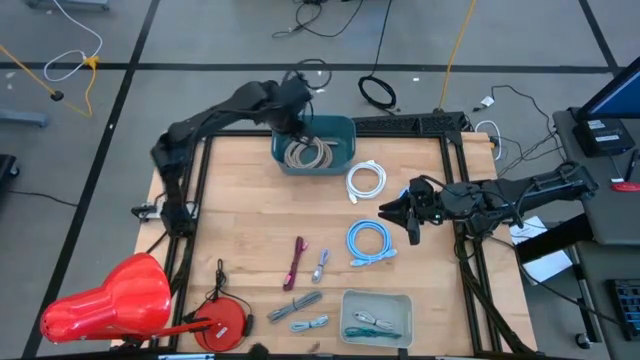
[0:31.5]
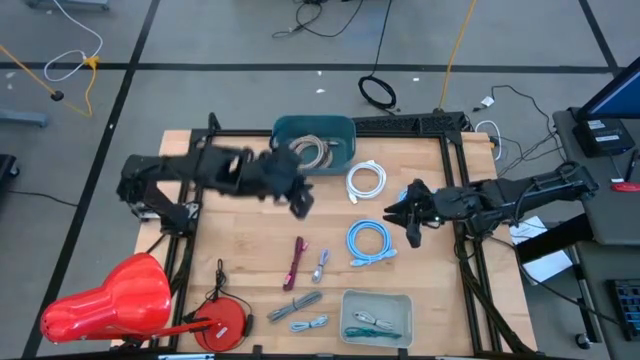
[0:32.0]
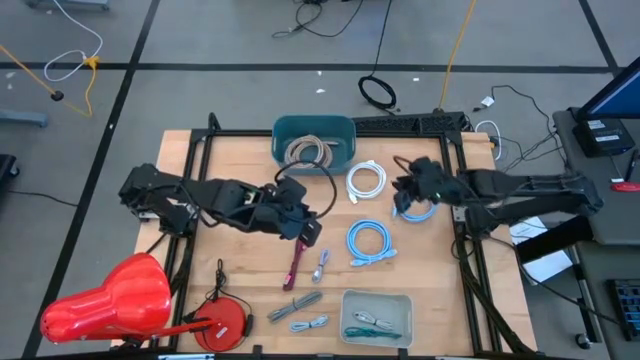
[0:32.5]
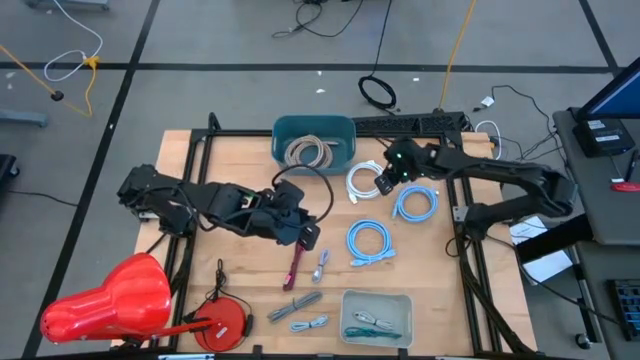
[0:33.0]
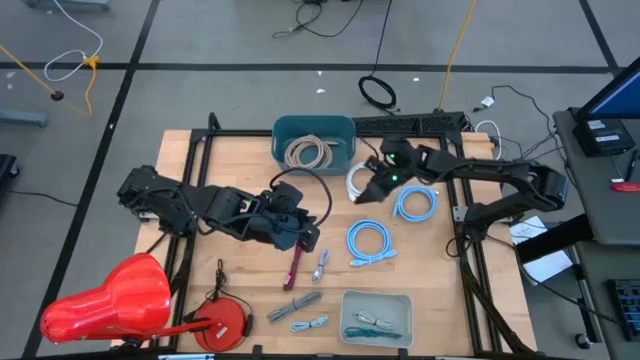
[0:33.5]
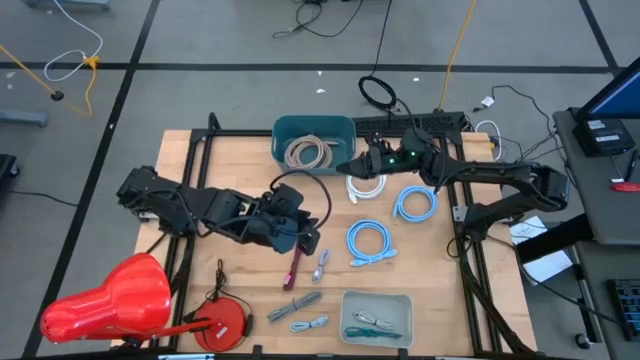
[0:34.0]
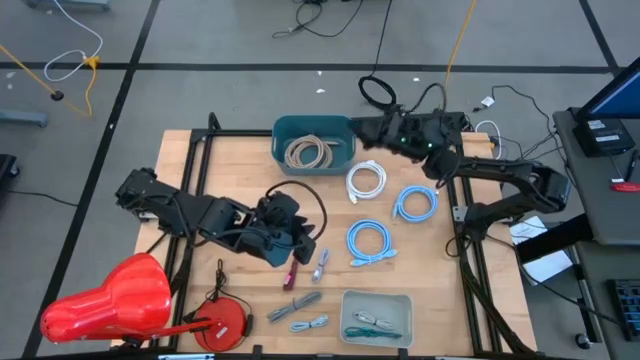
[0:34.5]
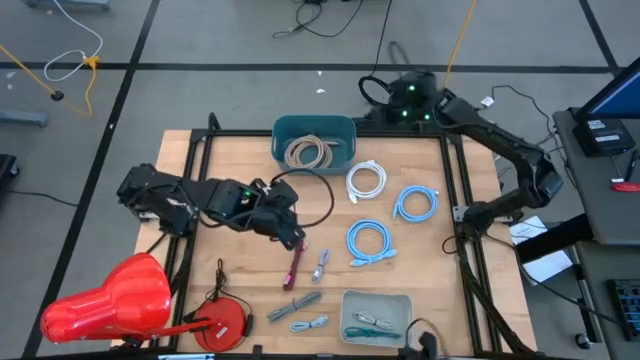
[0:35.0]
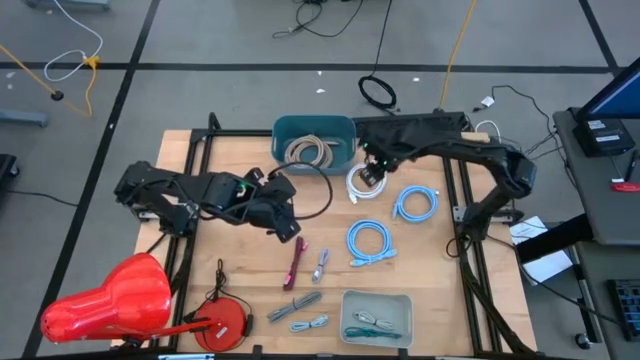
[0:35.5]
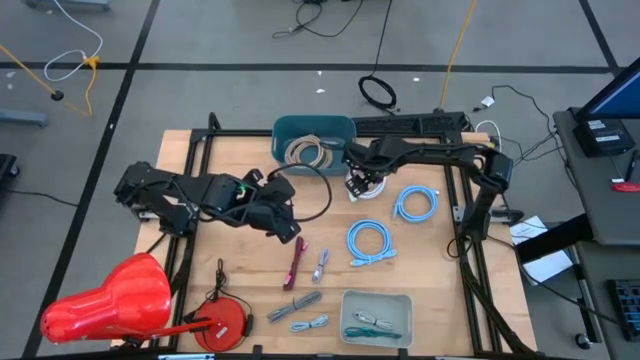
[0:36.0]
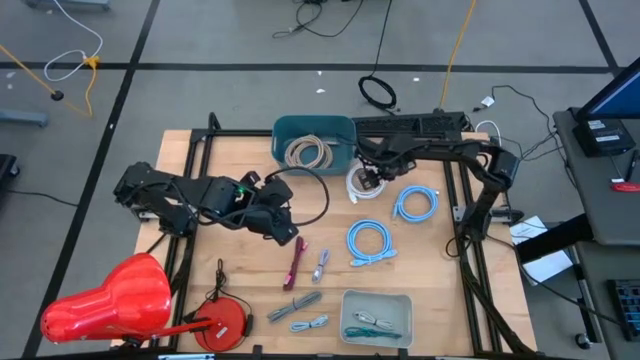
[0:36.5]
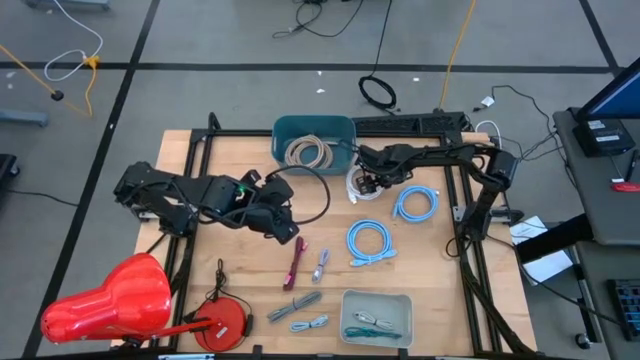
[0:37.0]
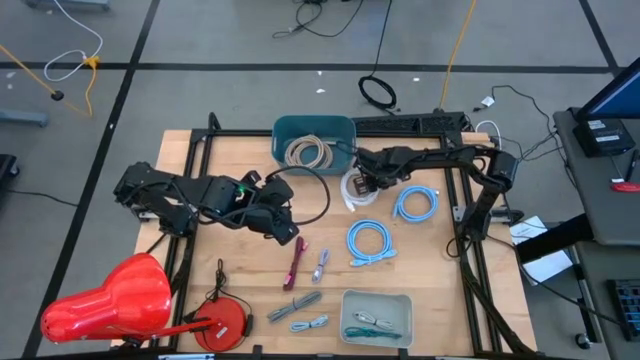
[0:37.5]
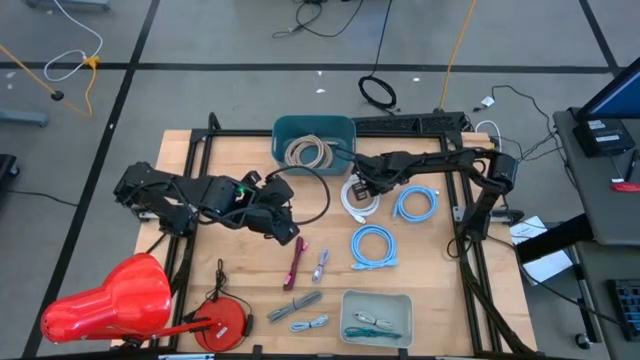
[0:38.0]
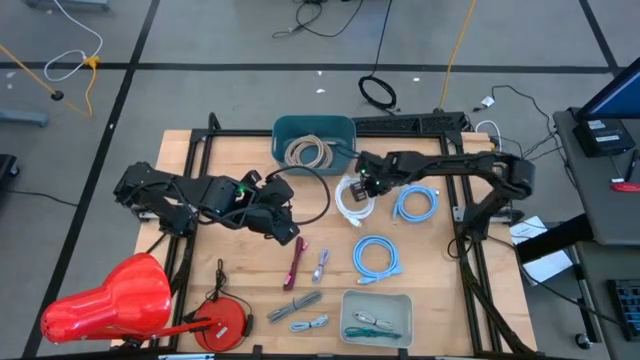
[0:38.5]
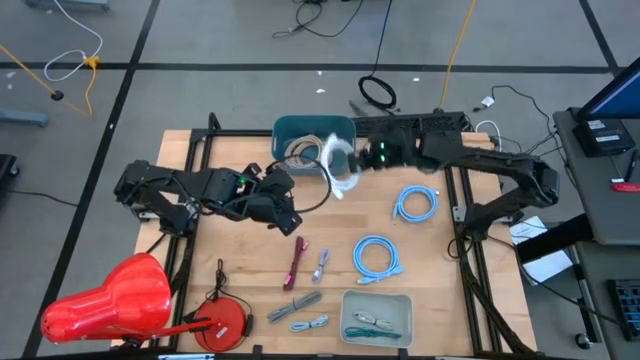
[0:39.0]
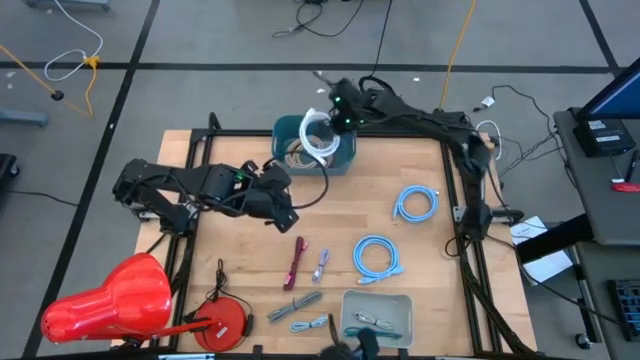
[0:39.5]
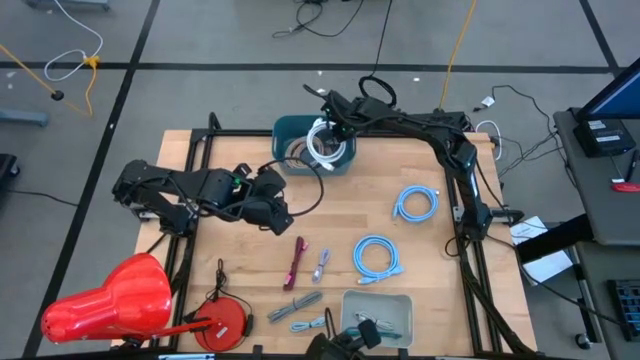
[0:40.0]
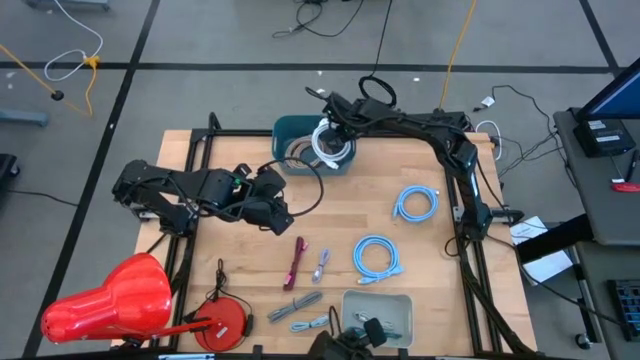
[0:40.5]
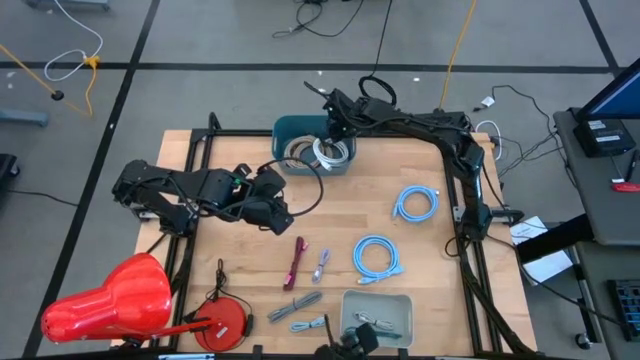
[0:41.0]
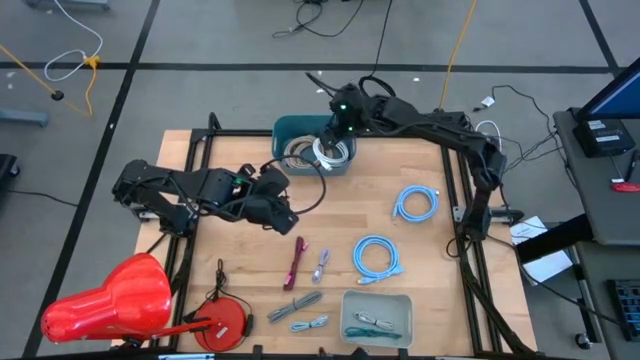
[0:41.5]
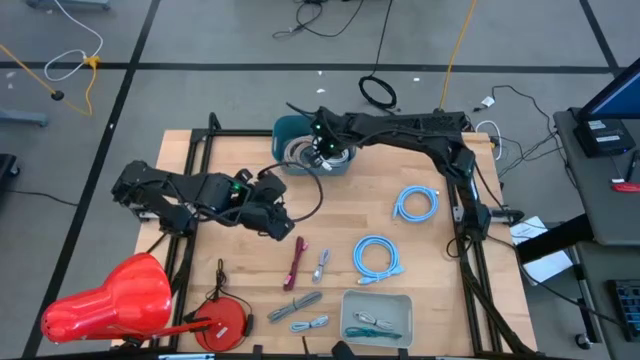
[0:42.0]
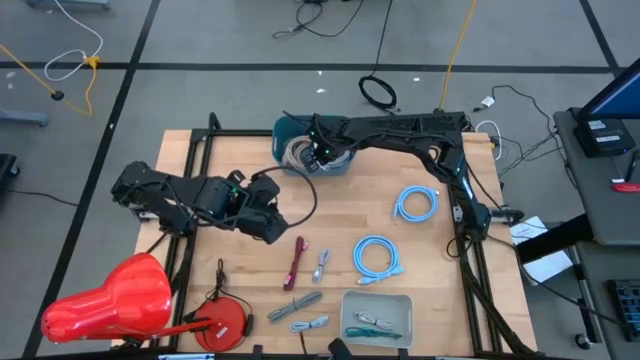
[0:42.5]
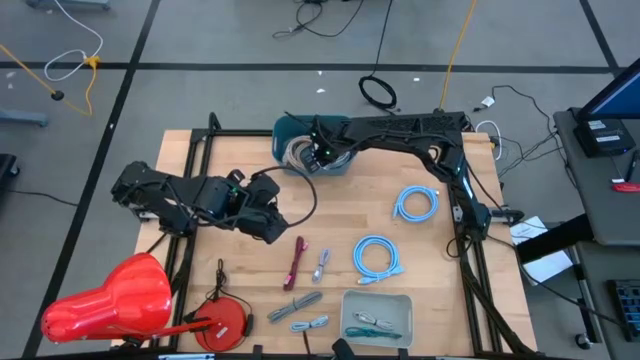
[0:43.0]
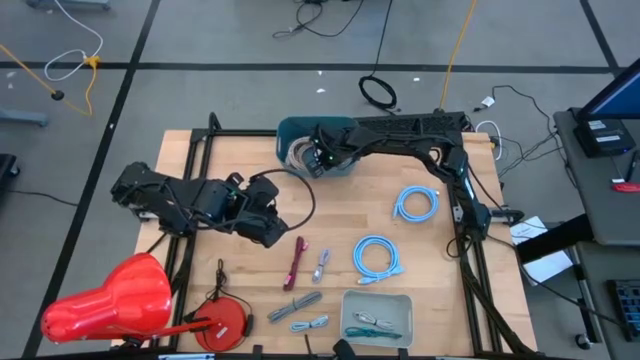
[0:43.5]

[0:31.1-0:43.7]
Task: Pick & Place USB Port
Put the white HDMI cable into the blue bin

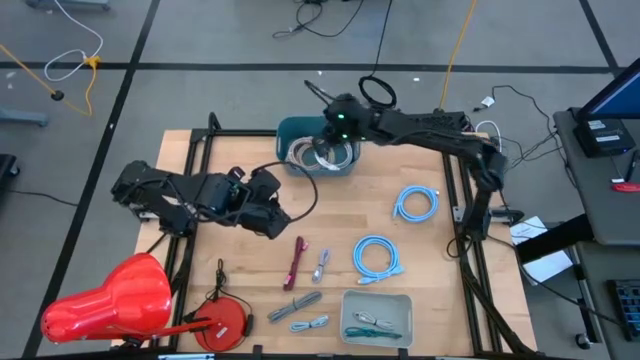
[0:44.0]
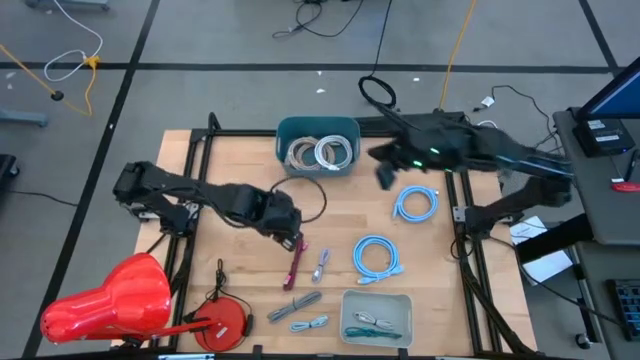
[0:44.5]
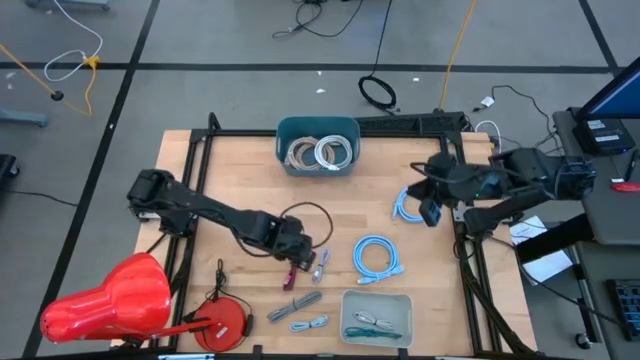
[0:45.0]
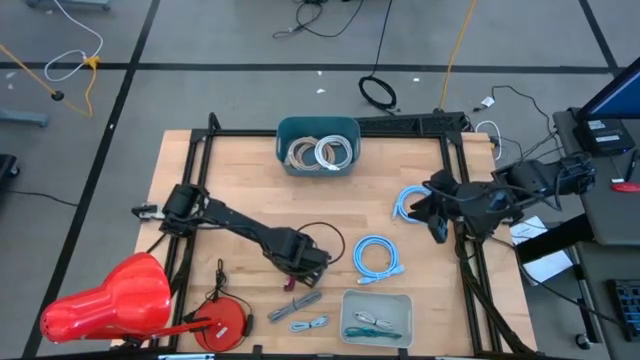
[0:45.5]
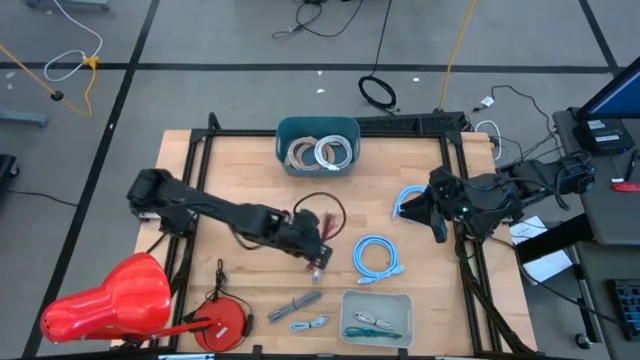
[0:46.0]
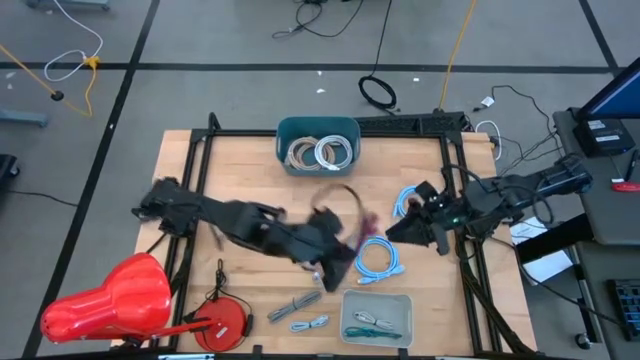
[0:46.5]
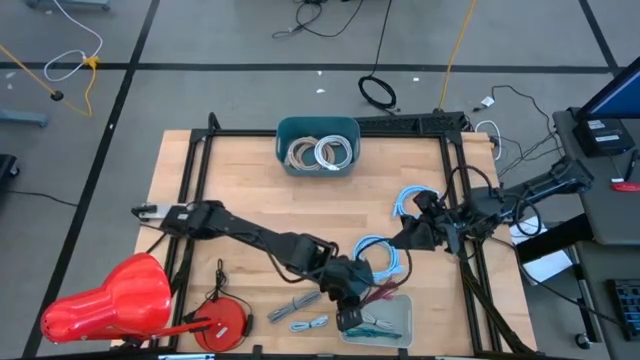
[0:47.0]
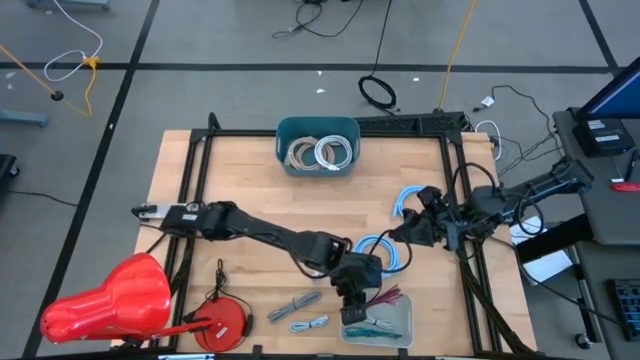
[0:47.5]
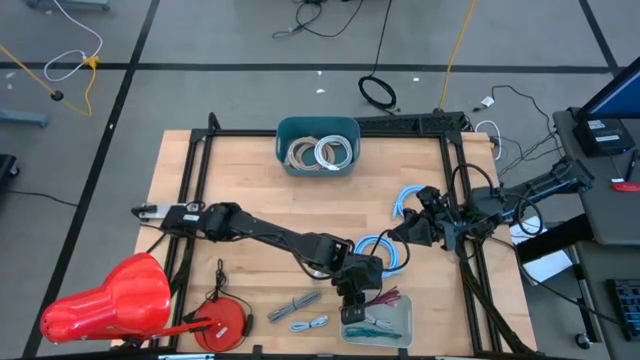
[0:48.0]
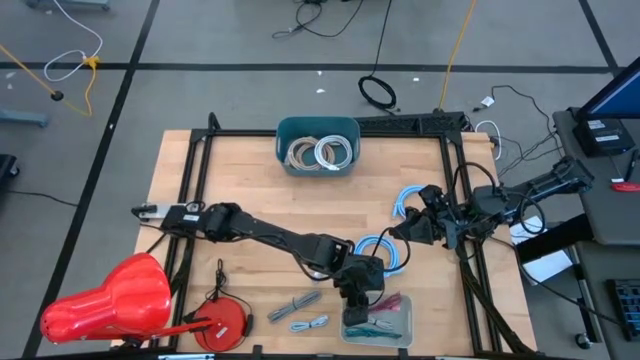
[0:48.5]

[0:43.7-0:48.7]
Put the red patterned charger cable into the gray bin

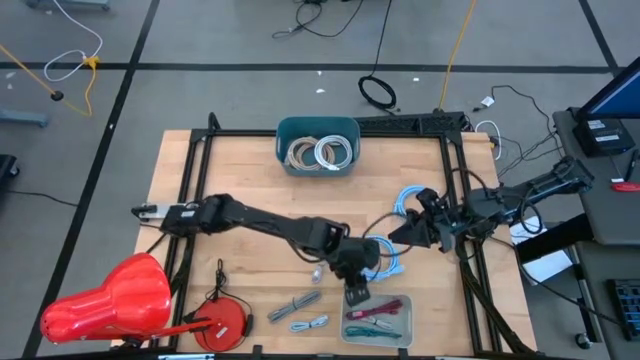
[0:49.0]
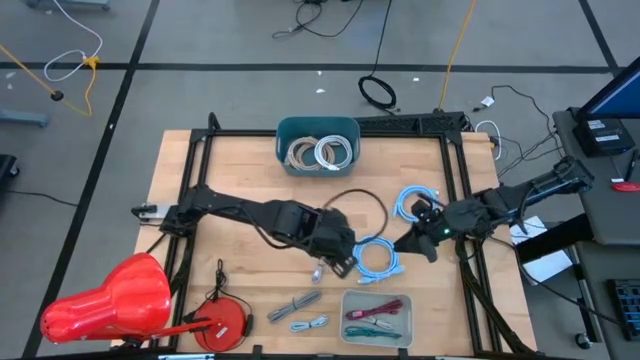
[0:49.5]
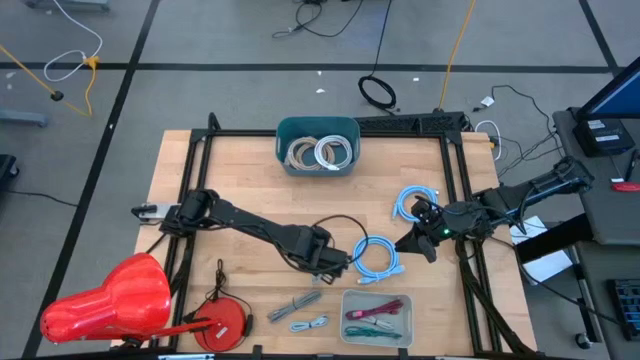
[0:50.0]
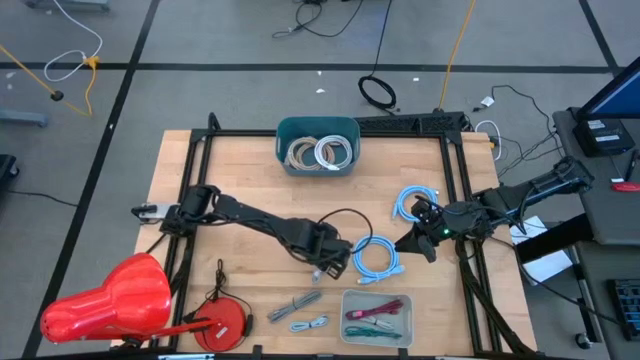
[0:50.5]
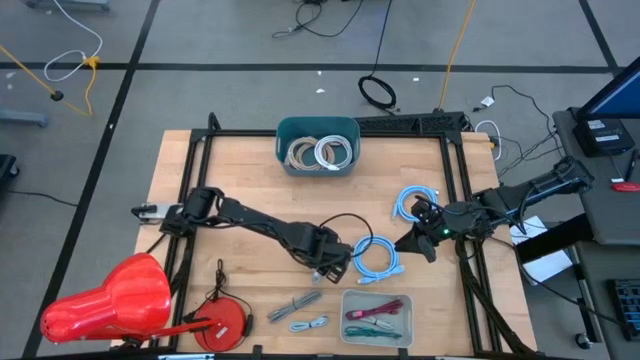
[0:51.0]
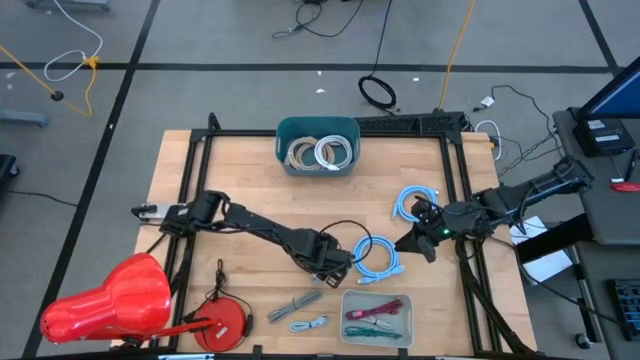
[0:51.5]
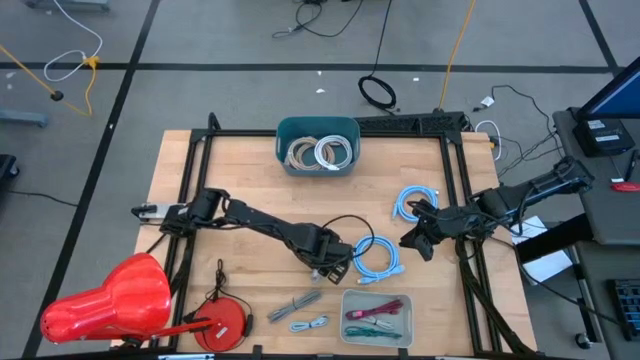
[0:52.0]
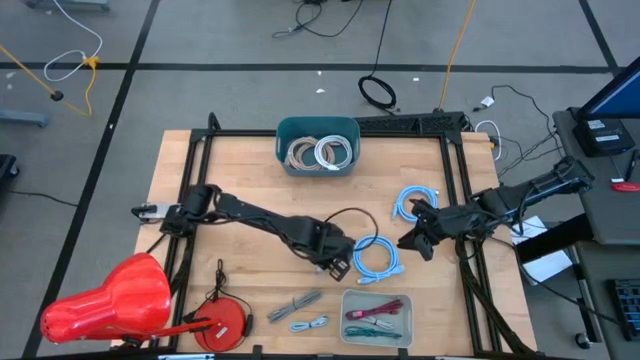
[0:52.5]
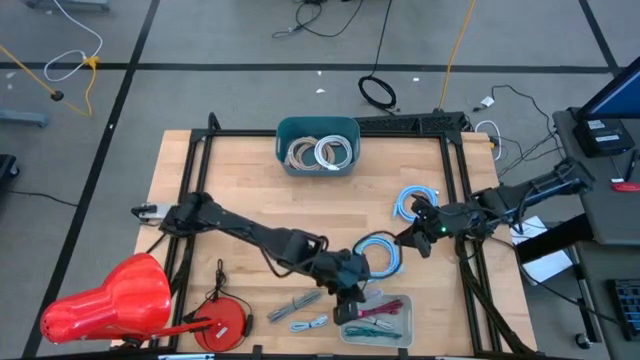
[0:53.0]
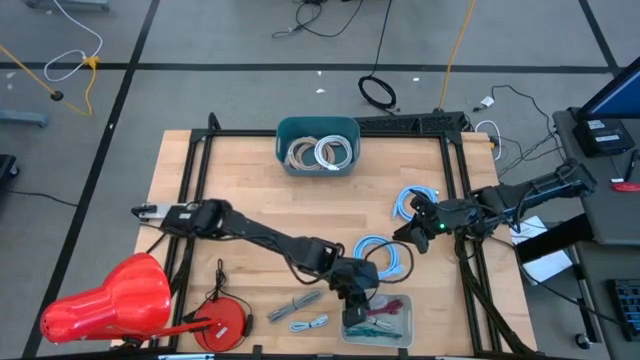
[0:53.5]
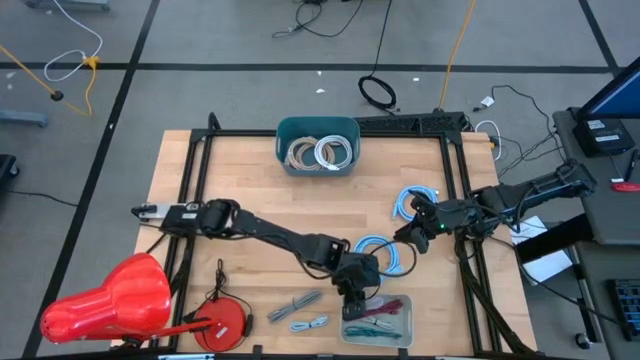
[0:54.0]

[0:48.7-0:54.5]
Put the purple charger cable into the gray bin
